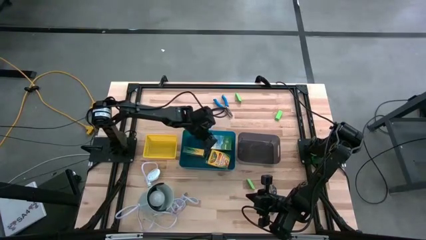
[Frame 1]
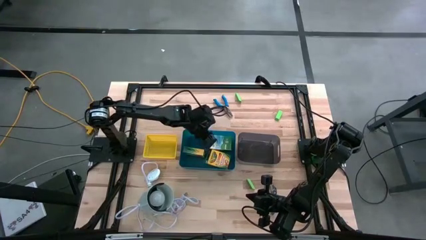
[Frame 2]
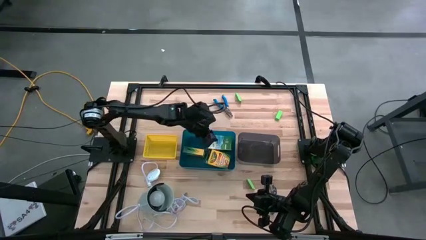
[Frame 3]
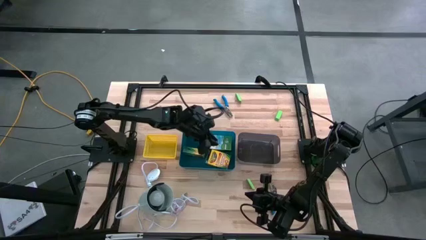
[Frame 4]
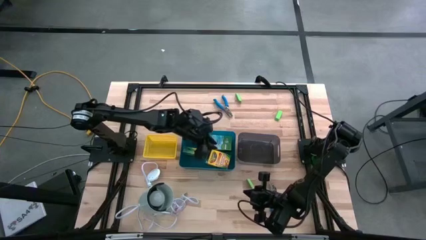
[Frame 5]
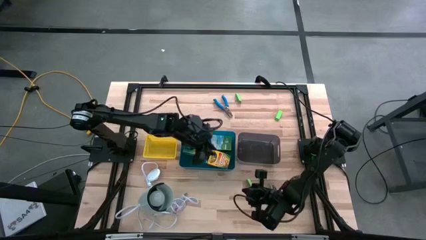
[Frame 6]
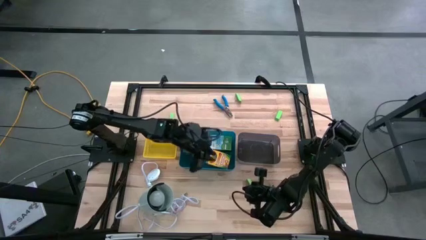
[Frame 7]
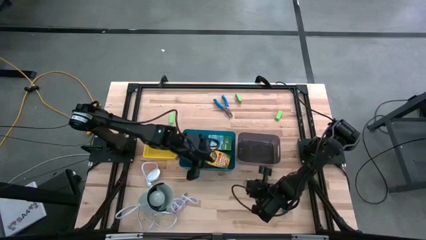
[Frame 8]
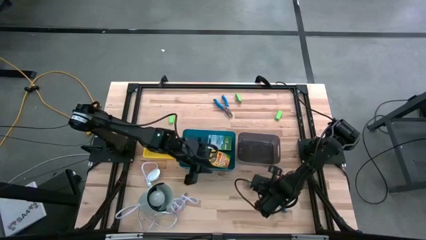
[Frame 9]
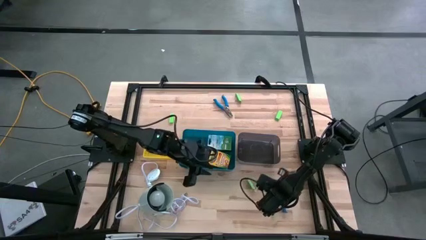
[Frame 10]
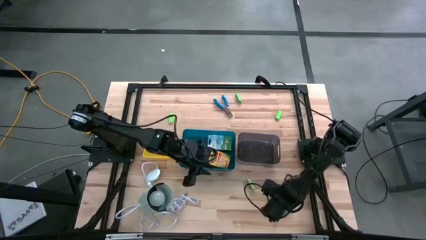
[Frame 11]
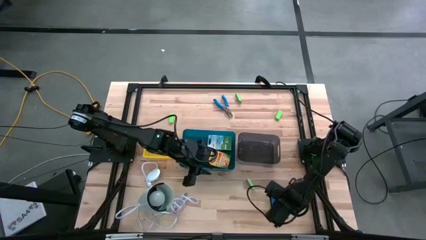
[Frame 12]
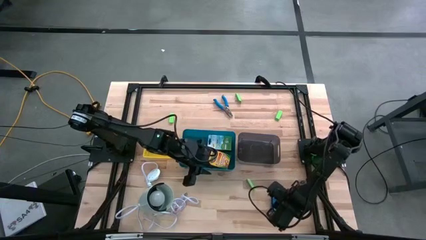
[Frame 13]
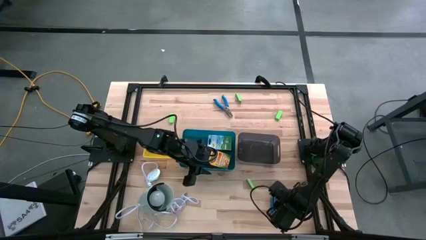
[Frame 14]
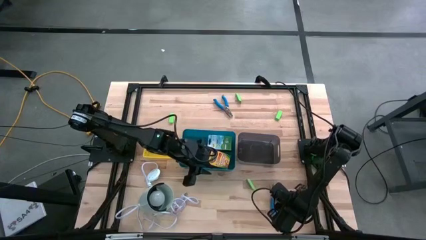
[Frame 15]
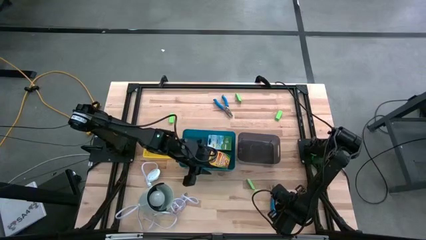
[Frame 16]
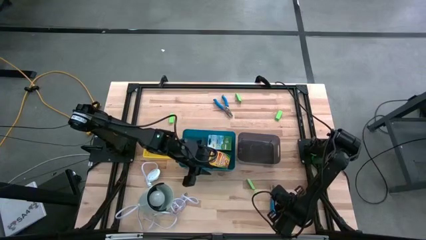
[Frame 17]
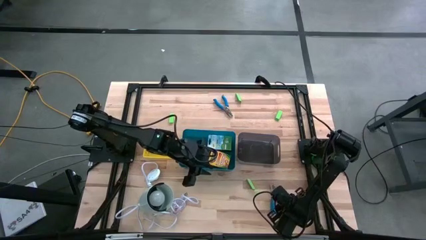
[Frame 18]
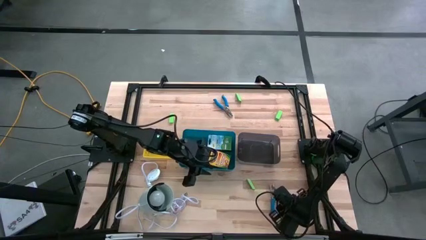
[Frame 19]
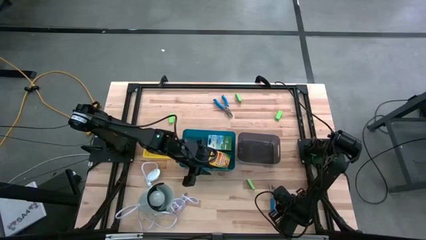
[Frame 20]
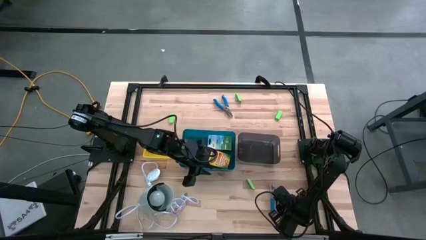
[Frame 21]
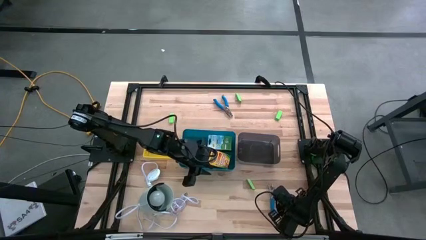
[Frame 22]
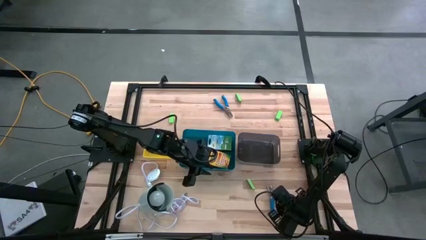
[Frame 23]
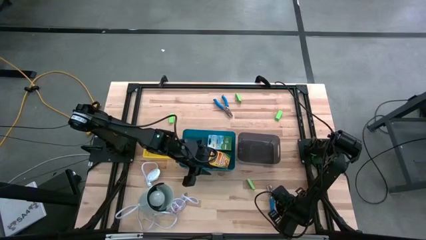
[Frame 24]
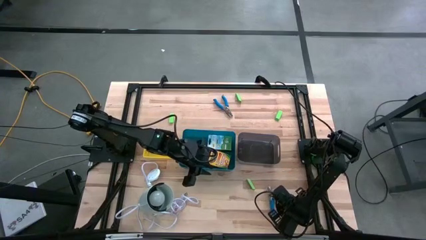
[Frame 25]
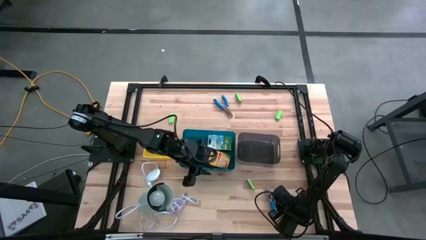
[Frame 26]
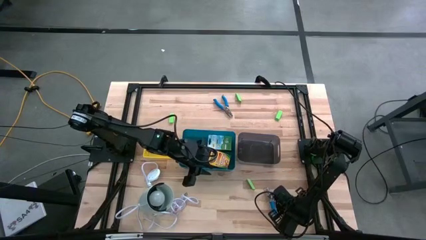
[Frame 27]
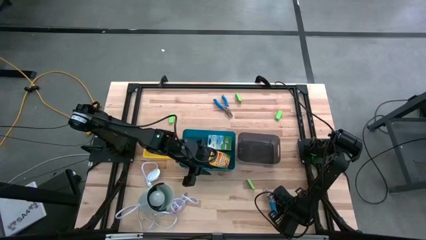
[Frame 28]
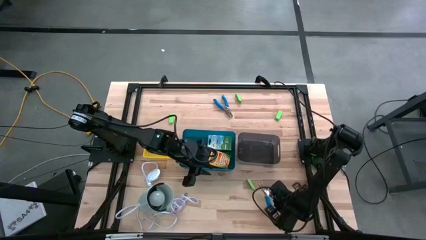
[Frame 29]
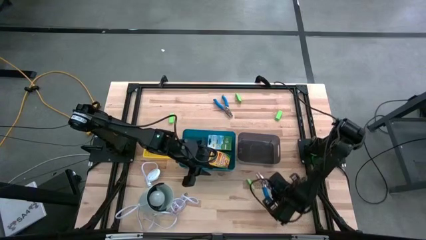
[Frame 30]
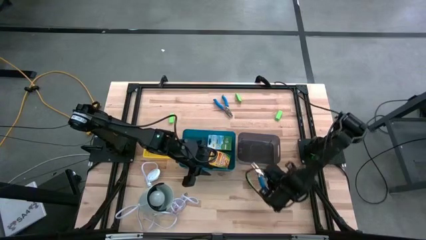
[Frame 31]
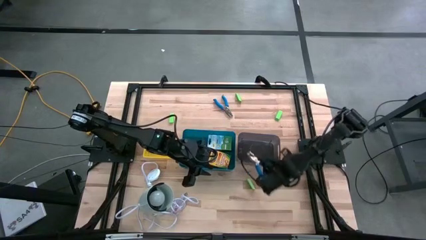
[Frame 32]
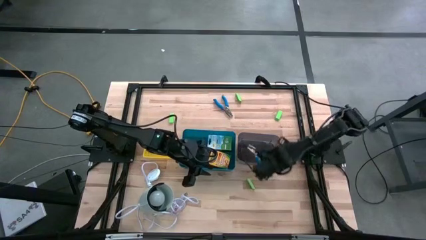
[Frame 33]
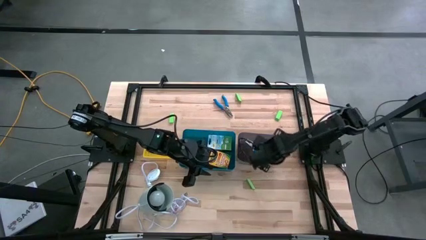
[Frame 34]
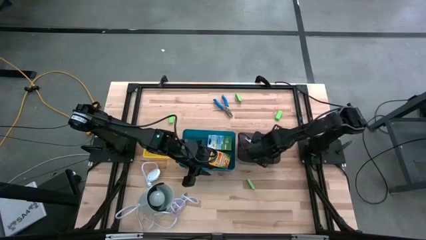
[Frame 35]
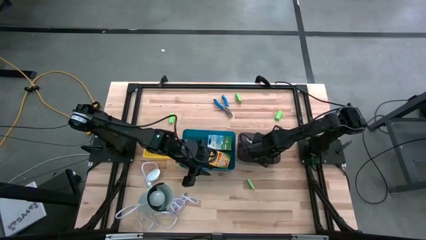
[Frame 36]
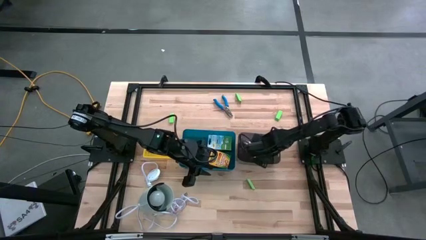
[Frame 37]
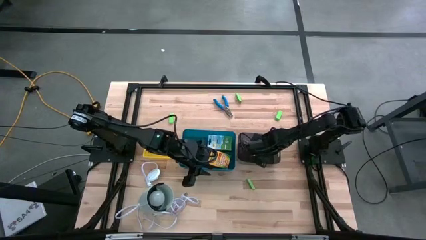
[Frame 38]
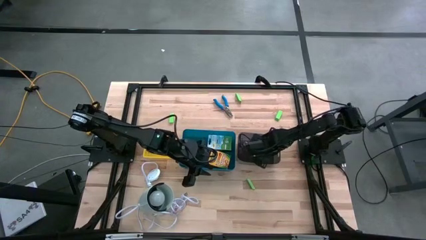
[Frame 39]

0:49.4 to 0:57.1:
Task: Pick & Place School Supplies
Put the blue hole puncher into the black bin

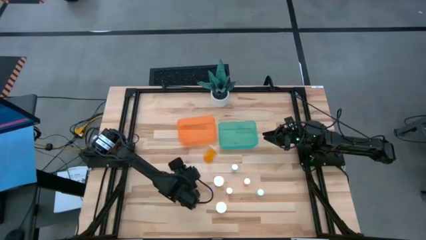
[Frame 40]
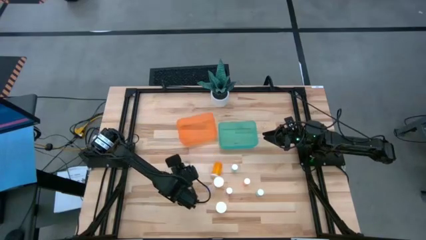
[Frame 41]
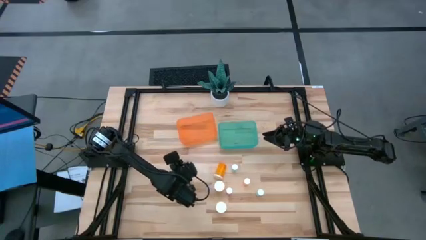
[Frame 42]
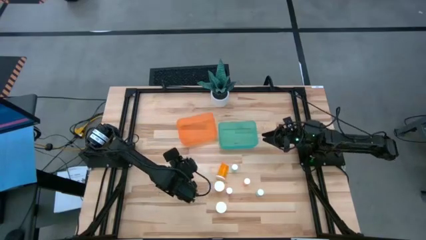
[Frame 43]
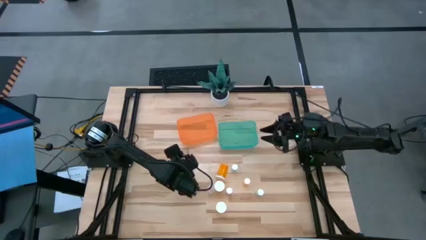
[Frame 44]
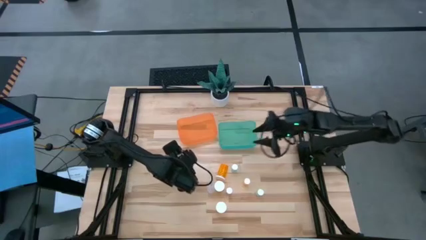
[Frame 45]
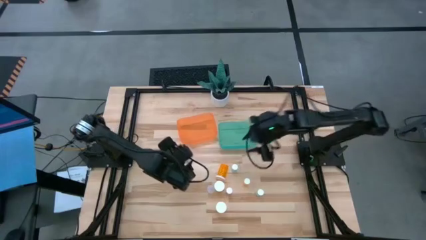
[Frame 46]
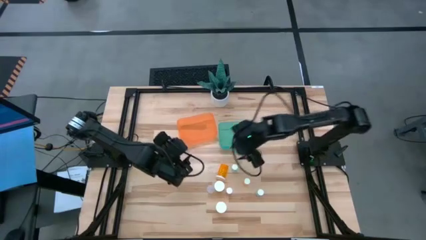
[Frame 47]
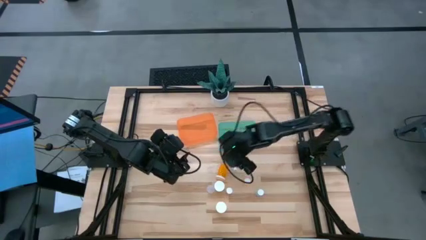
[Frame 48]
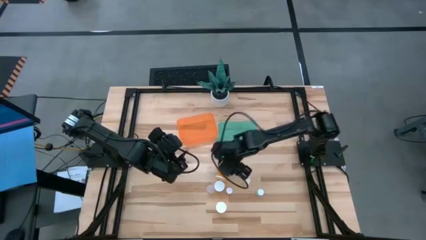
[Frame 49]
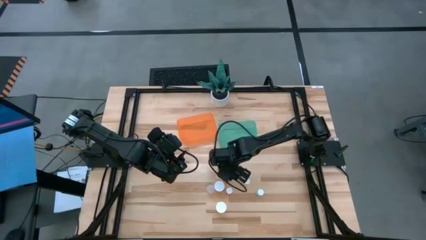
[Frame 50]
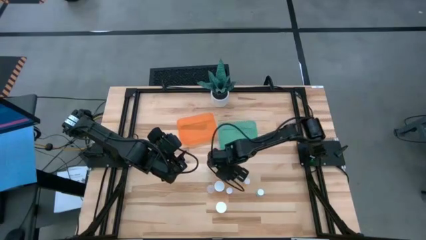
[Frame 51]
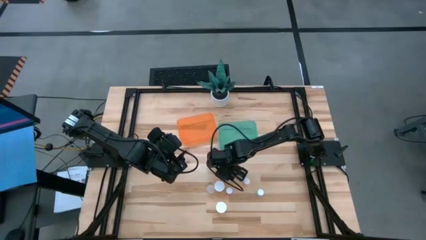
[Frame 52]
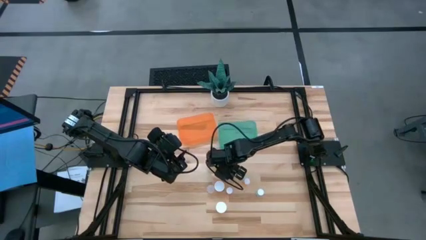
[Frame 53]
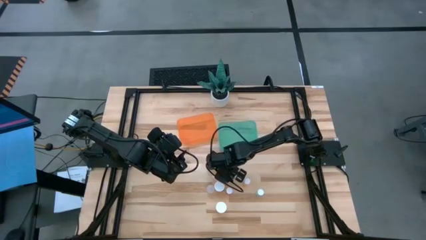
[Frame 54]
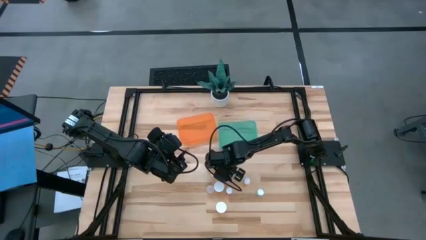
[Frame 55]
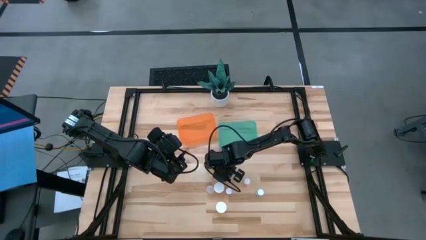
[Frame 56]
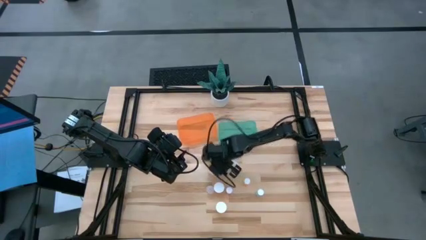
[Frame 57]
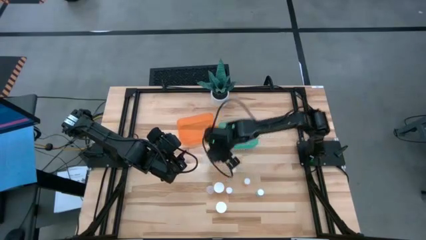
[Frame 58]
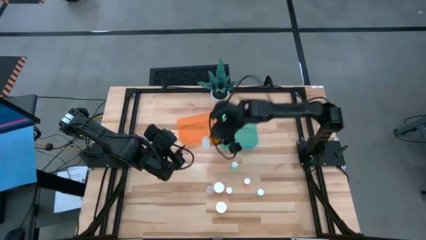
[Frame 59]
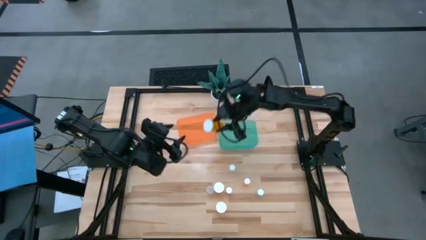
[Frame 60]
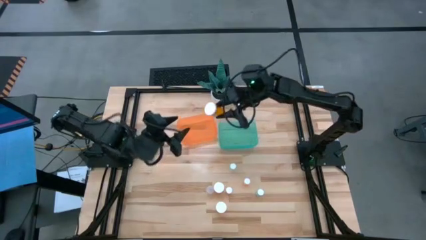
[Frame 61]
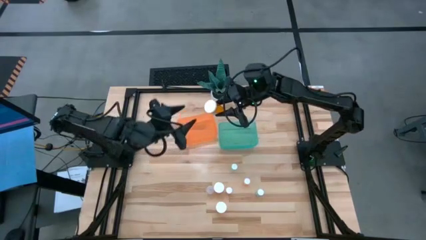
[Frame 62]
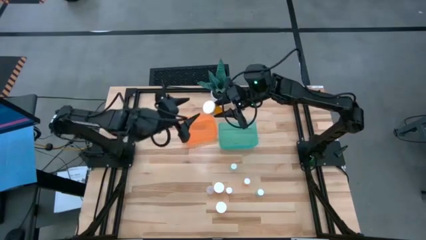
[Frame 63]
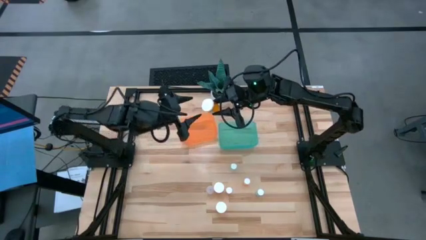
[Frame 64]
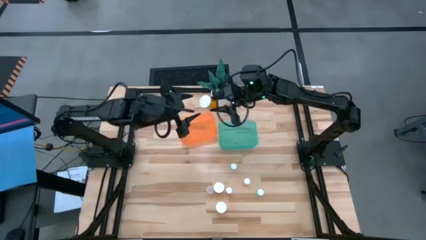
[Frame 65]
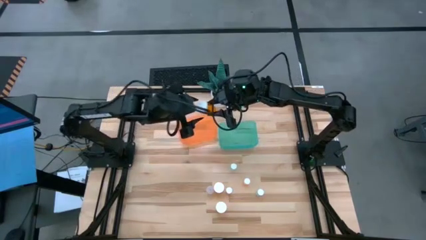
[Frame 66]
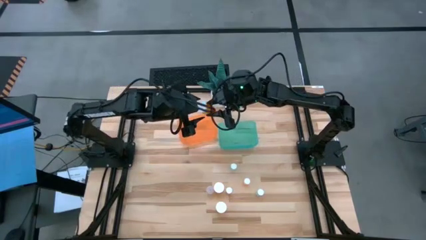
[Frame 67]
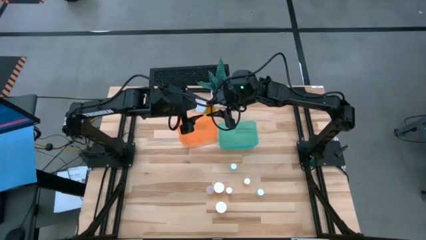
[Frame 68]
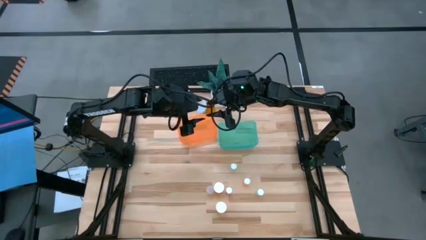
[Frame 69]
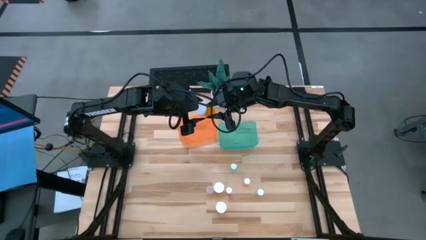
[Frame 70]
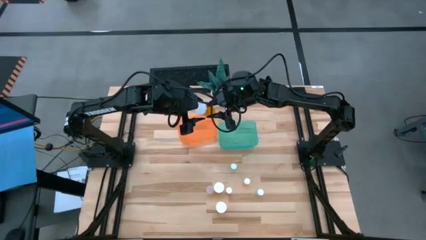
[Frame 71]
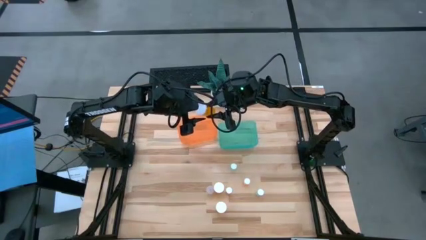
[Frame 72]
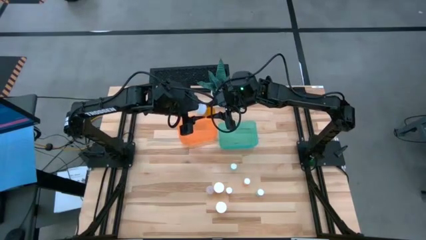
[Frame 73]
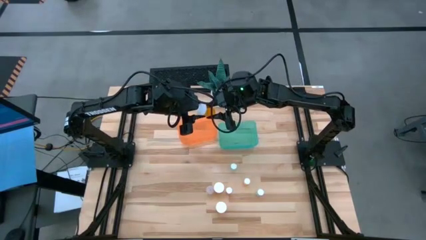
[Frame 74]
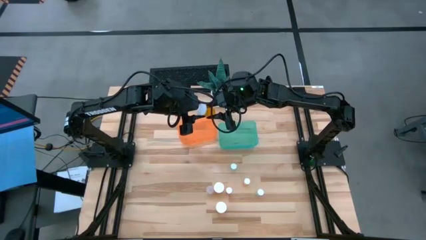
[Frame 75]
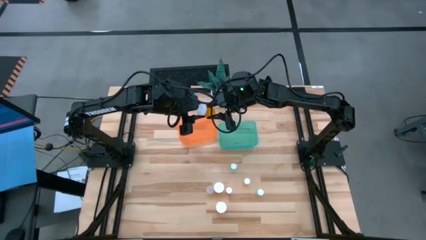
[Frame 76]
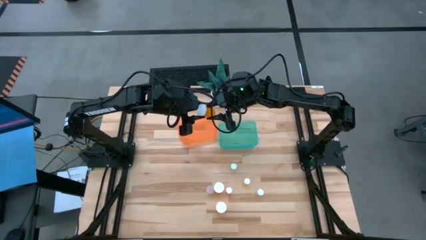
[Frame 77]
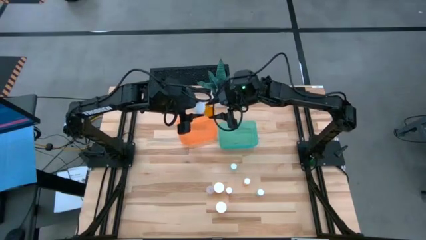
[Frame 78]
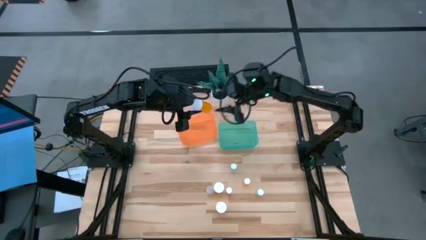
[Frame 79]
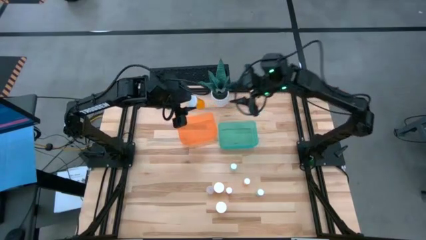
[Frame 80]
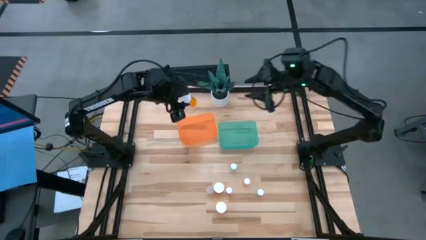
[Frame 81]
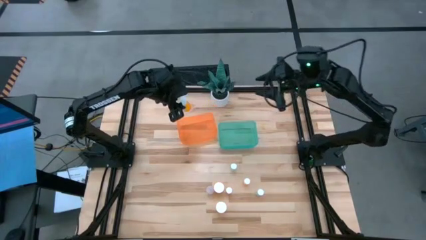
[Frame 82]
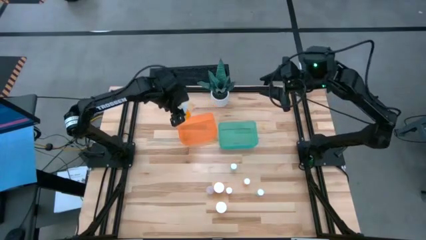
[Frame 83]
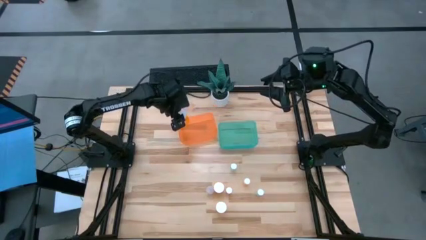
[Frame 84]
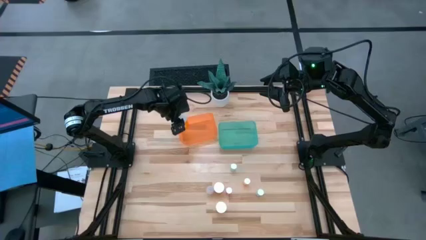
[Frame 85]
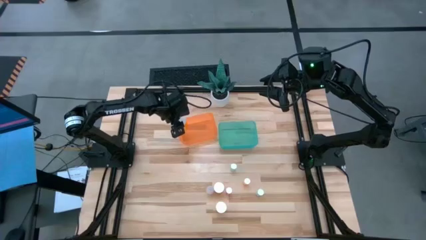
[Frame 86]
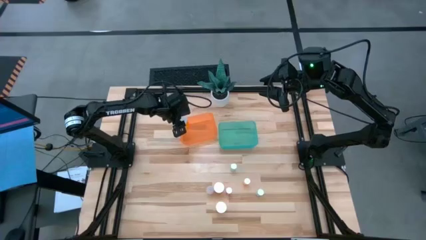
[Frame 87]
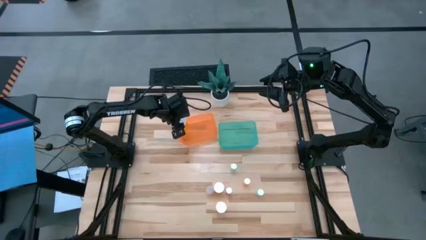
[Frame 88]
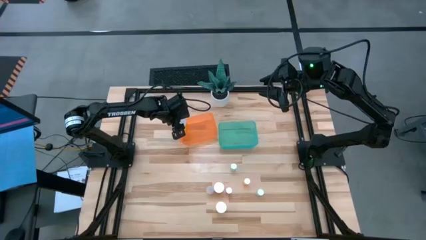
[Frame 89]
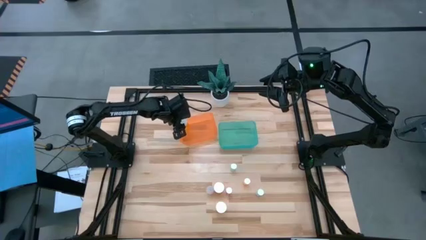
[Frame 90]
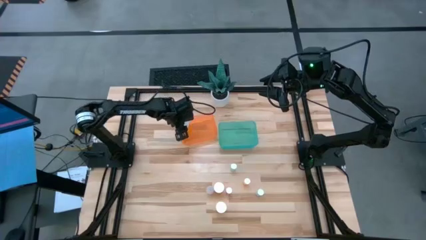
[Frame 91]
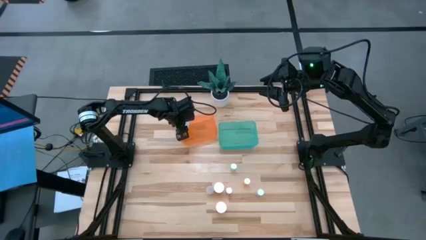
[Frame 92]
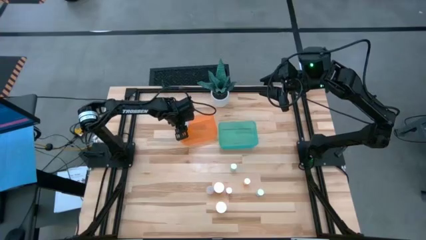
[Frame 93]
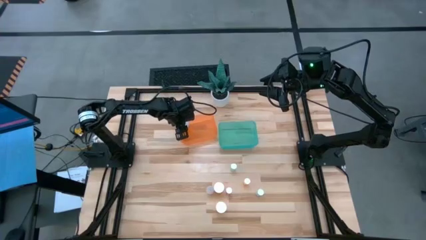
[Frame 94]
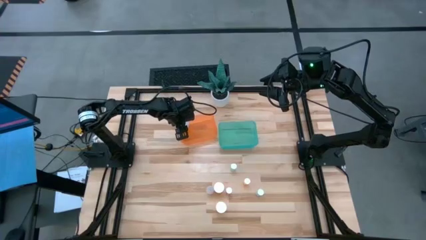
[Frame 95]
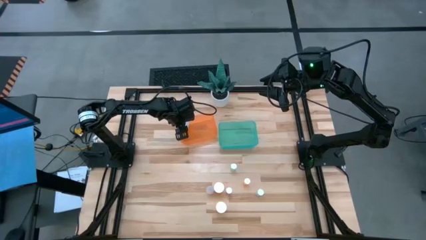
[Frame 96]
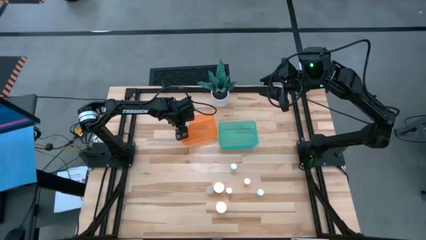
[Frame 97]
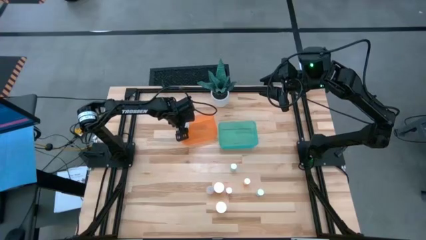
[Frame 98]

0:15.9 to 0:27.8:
Task: Pick and place medicine bottles into bin by pill shape (circle, oval)
Put the bottom left orange capsule bottle into the orange bin
